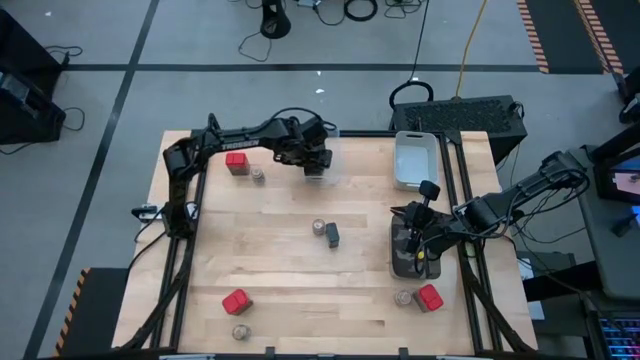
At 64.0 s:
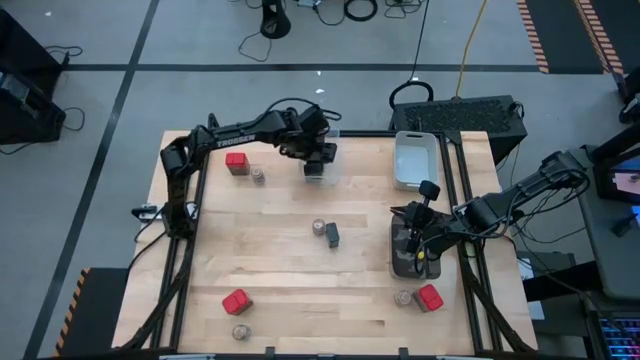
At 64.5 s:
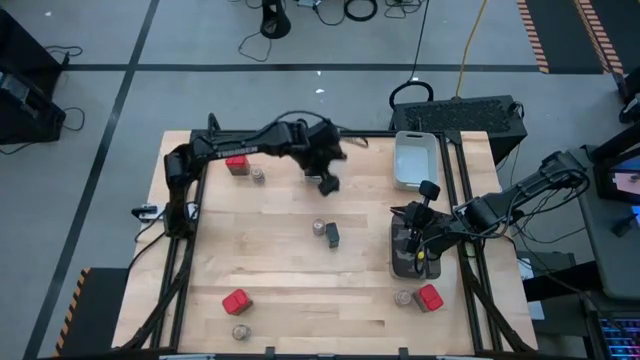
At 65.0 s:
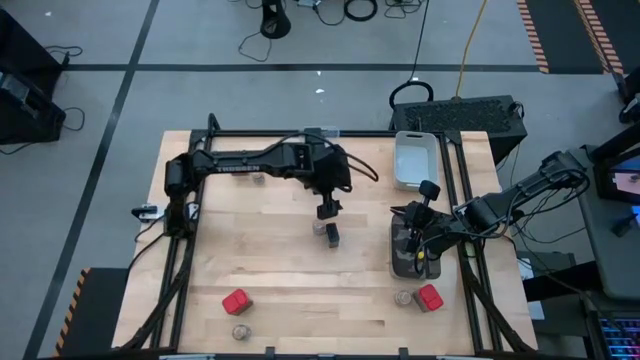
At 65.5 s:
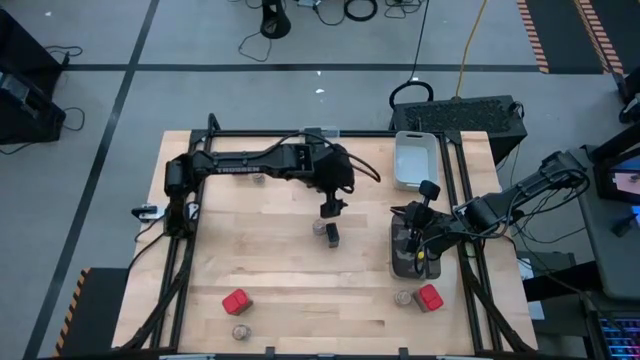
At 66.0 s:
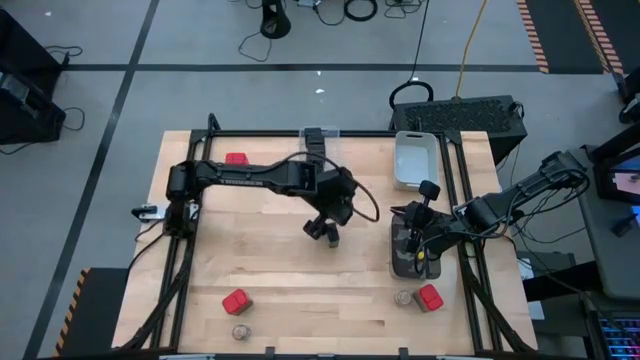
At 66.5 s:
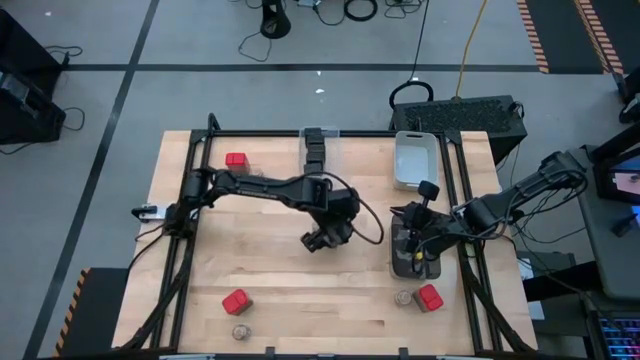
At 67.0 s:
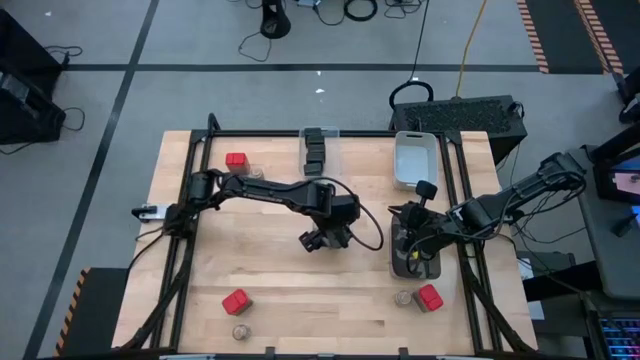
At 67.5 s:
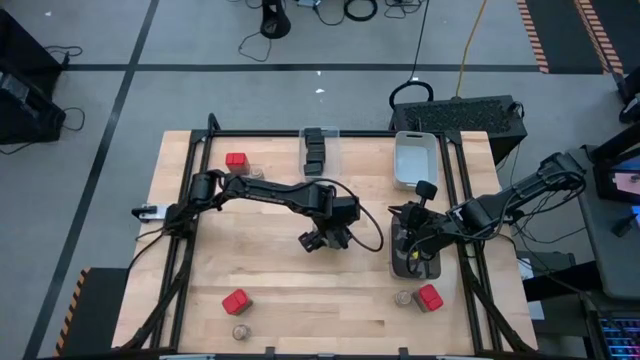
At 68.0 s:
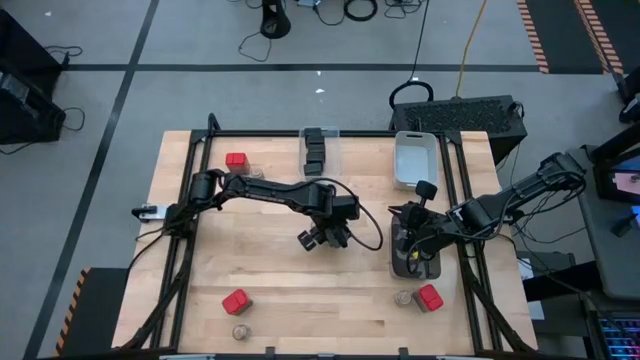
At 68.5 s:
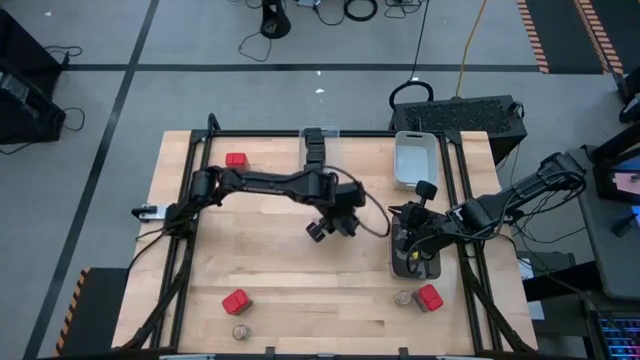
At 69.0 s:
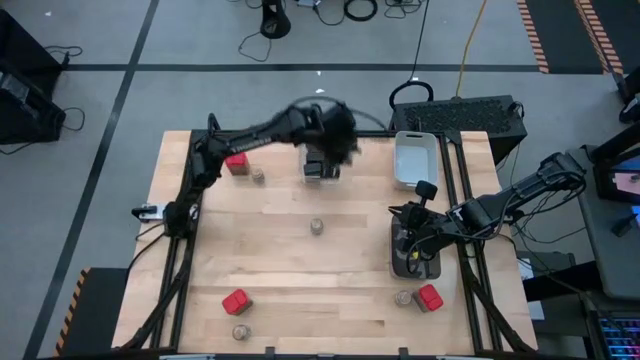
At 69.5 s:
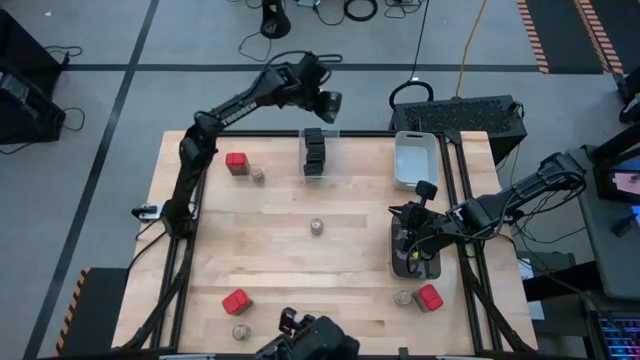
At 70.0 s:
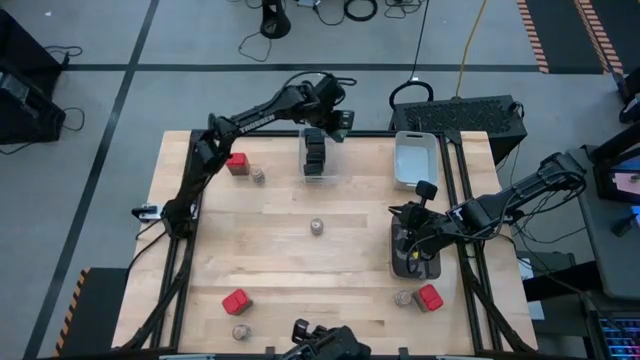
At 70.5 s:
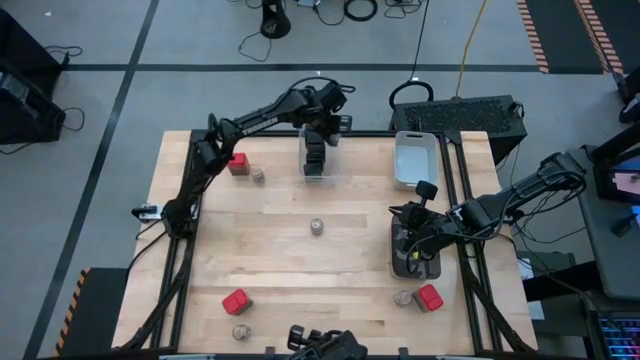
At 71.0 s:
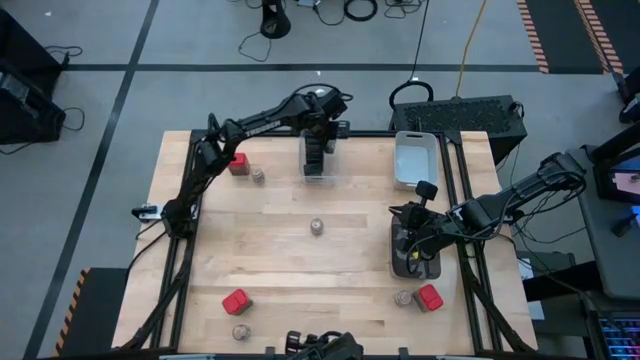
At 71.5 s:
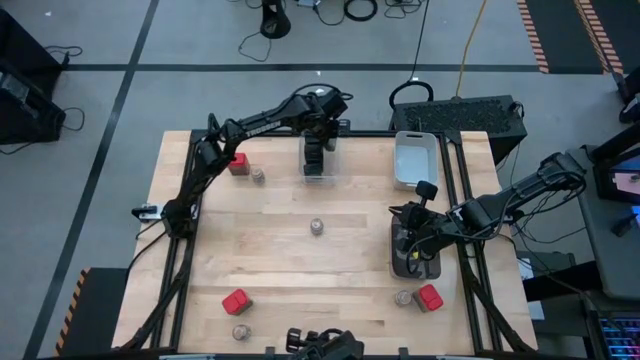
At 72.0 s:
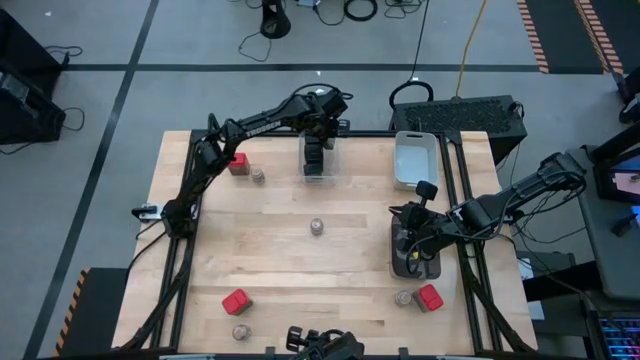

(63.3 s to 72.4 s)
Task: Sort spices by type
Put the black seasoning can into the transparent bin

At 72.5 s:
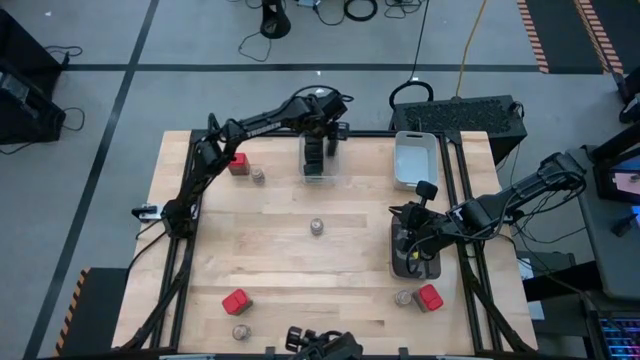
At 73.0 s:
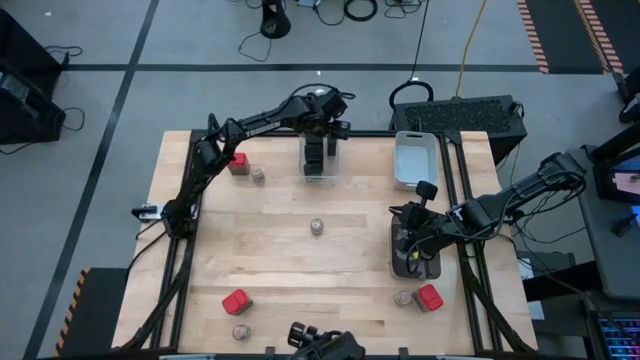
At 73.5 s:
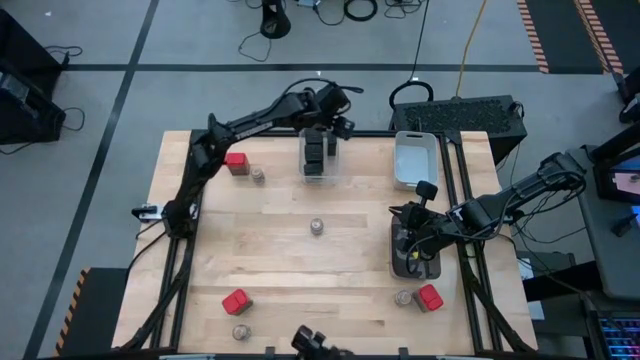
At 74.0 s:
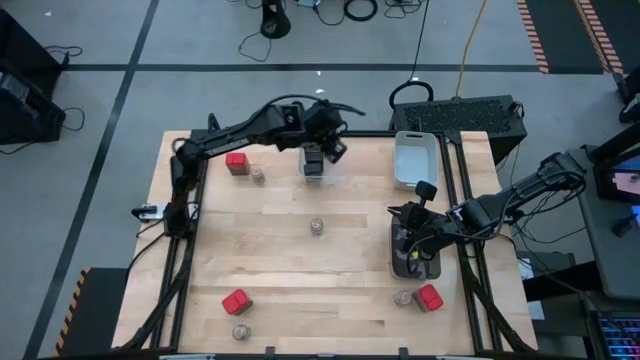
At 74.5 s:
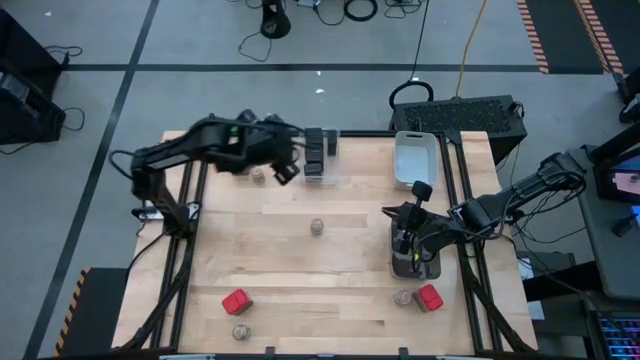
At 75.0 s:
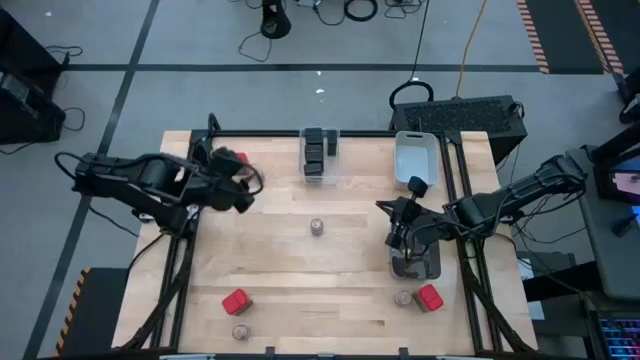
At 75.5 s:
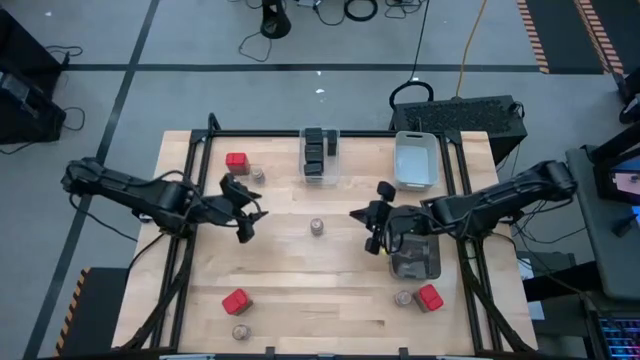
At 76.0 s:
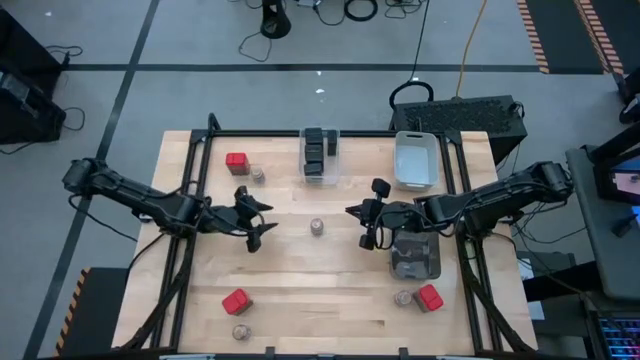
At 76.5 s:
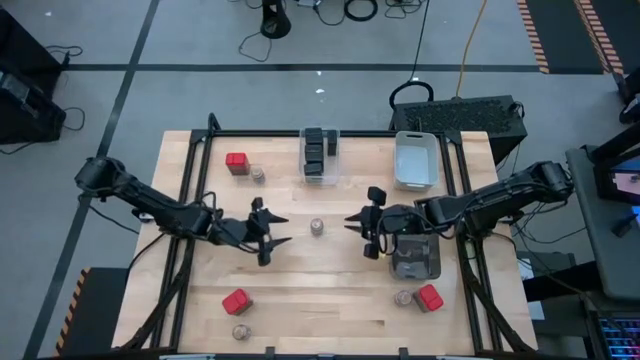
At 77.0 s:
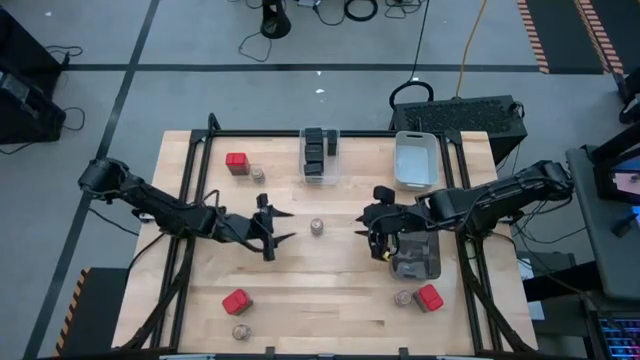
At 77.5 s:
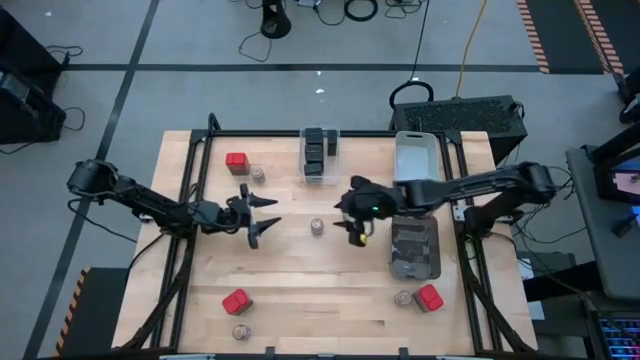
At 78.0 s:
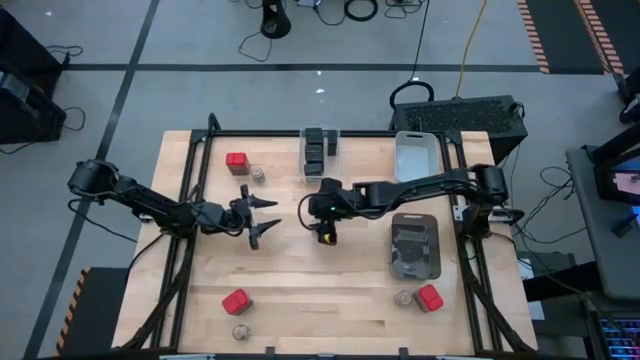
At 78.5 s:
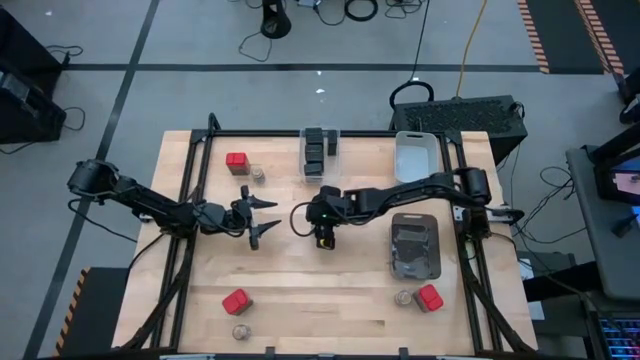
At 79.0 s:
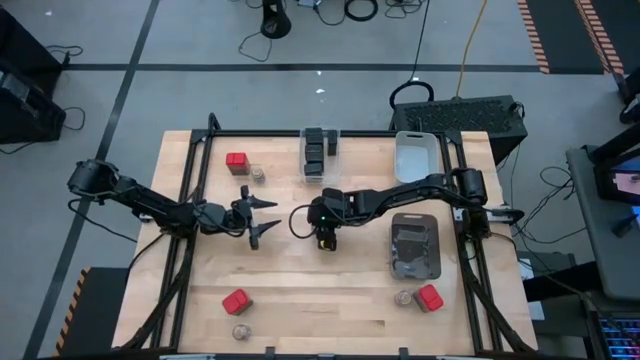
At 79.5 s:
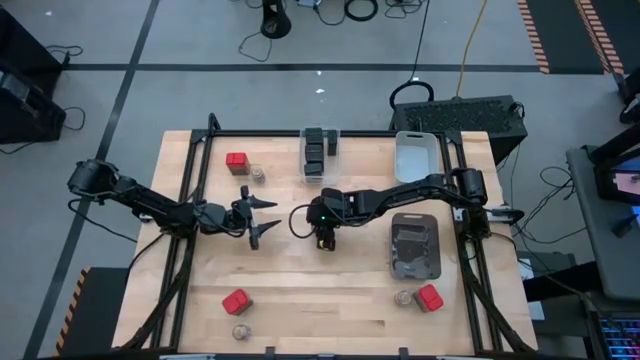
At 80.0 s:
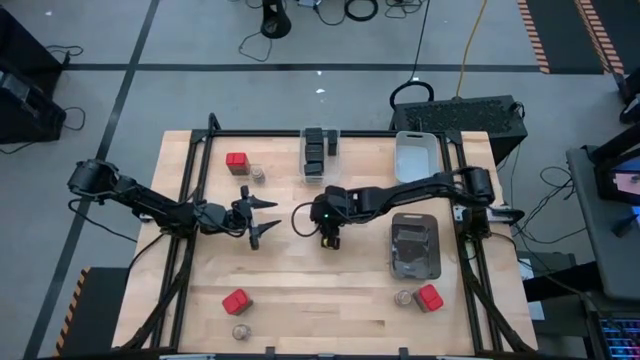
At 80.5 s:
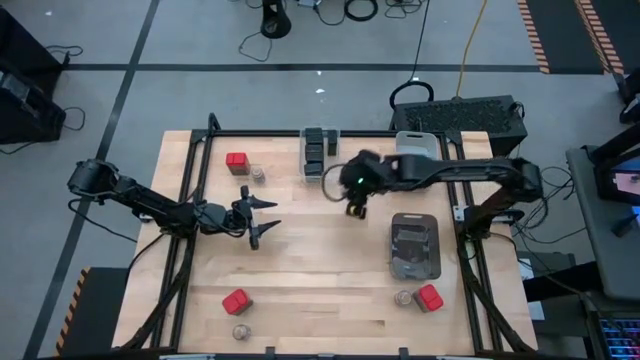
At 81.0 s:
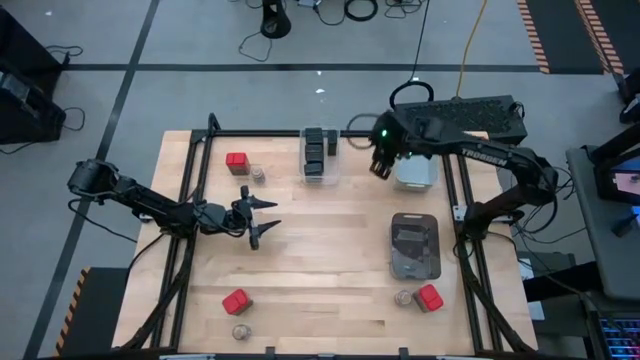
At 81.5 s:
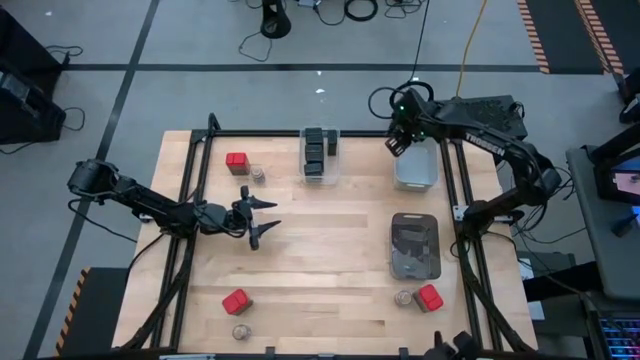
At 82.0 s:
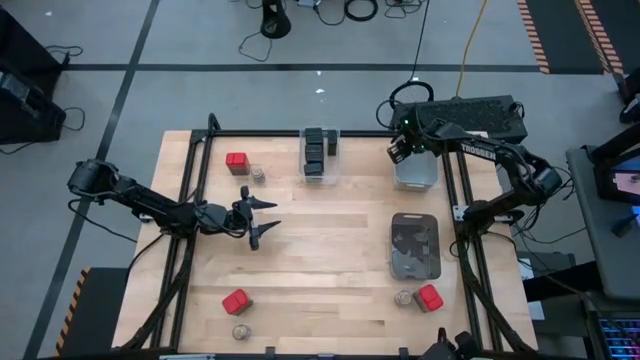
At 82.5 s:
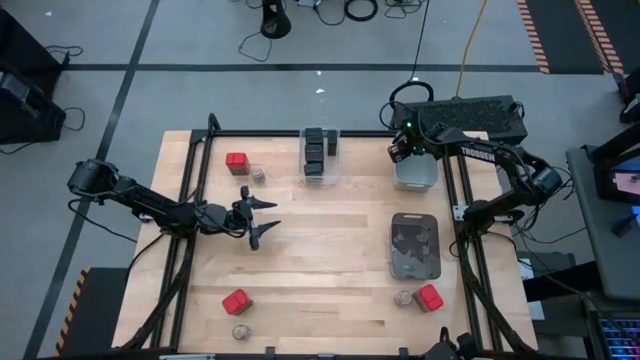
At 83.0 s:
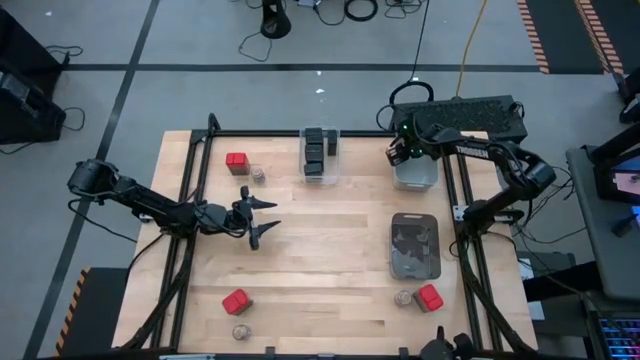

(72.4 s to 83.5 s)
Put the center transparent seasoning bottle into the gray bin
